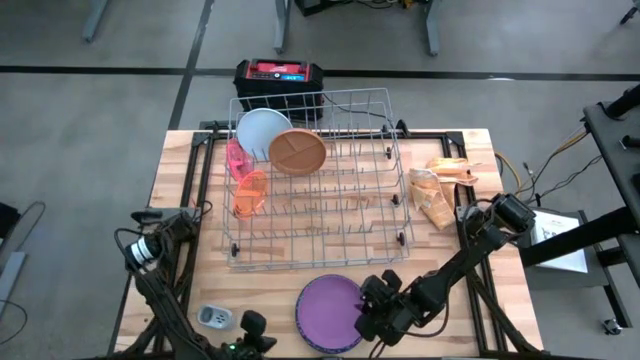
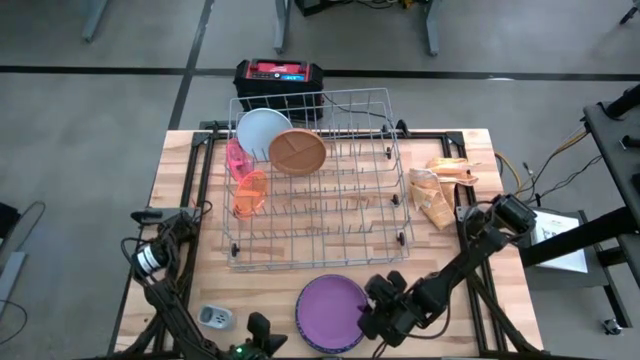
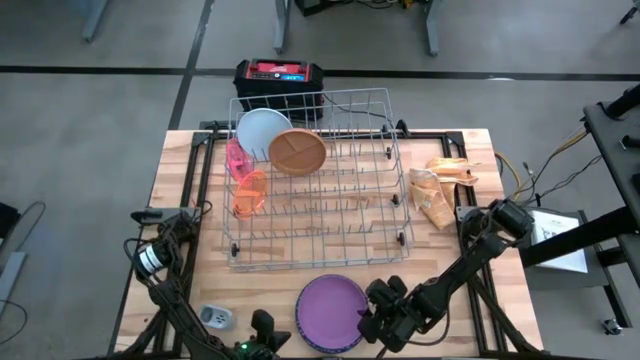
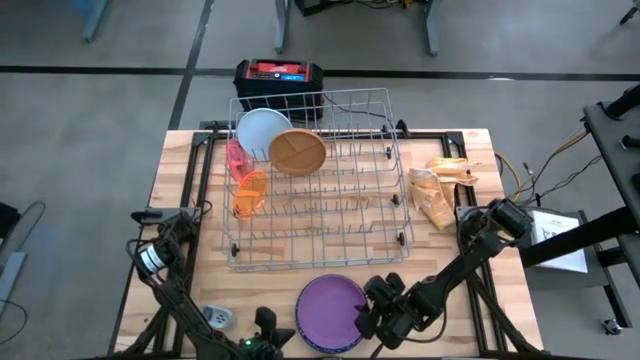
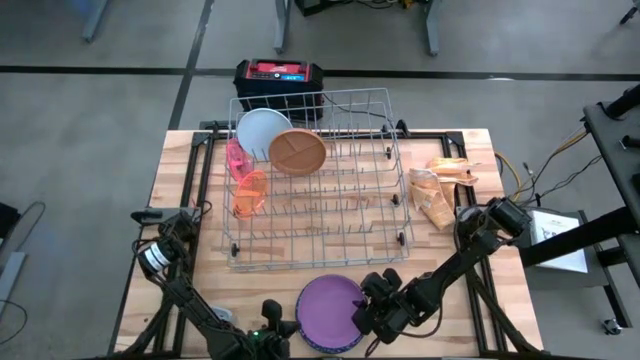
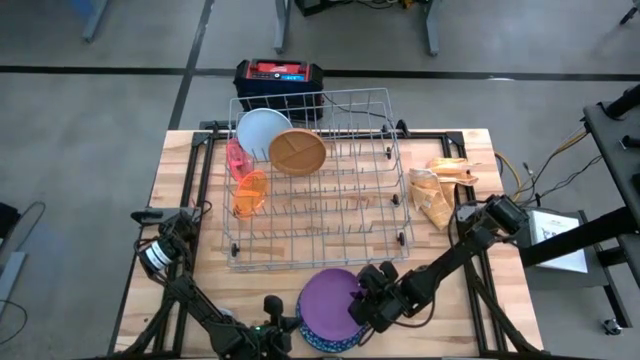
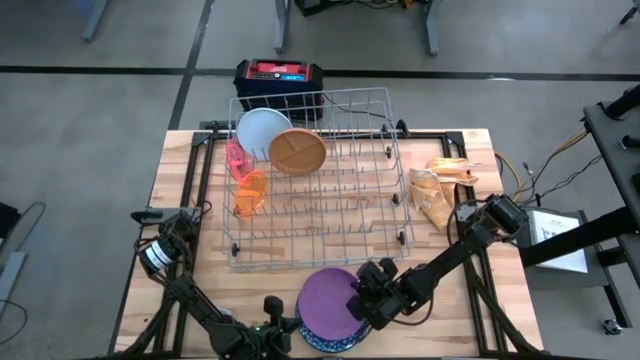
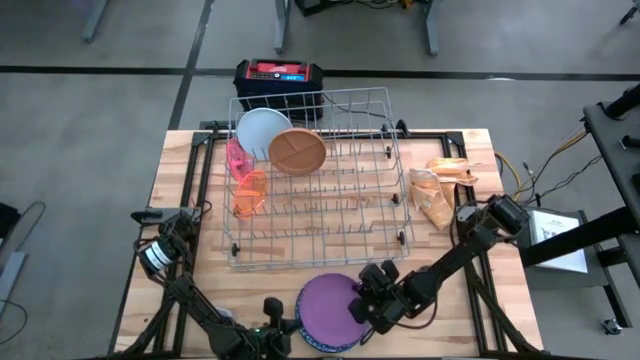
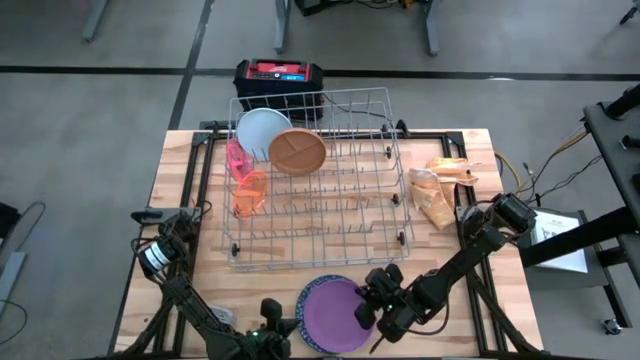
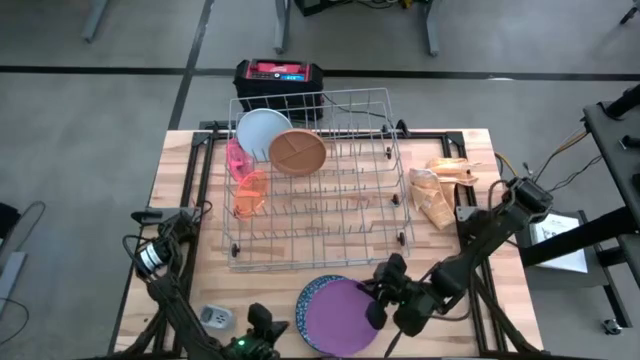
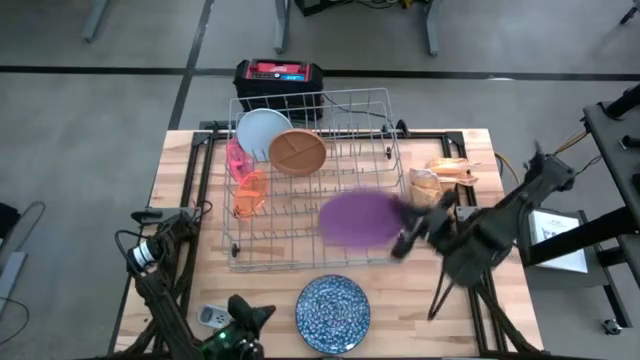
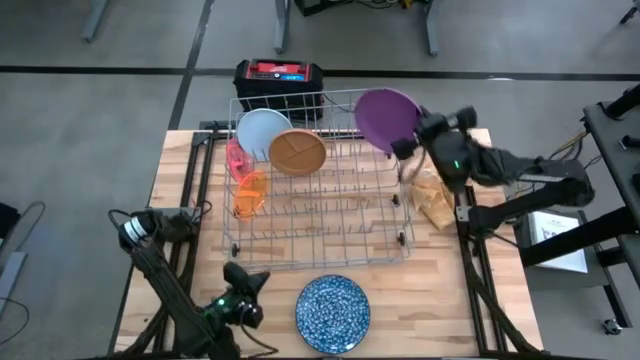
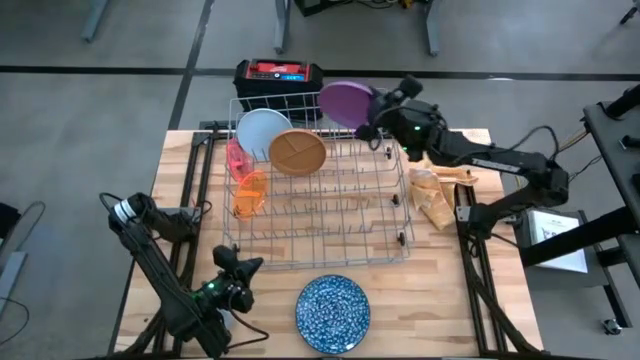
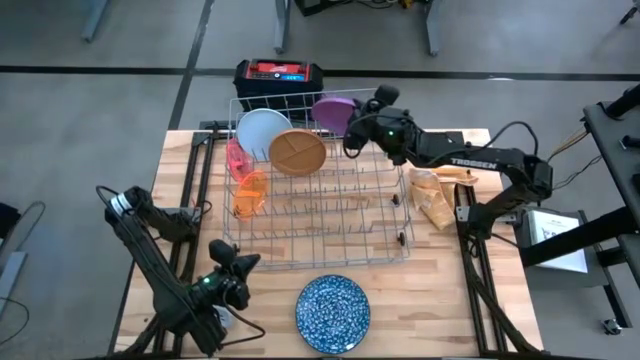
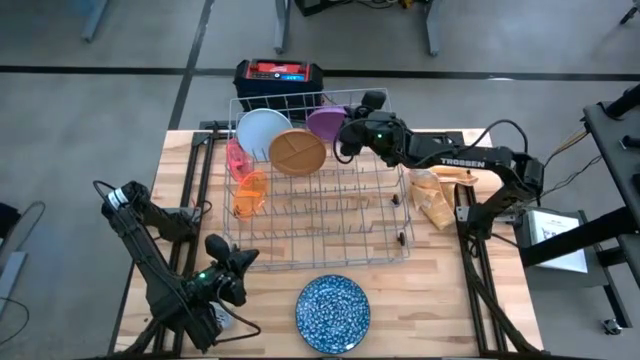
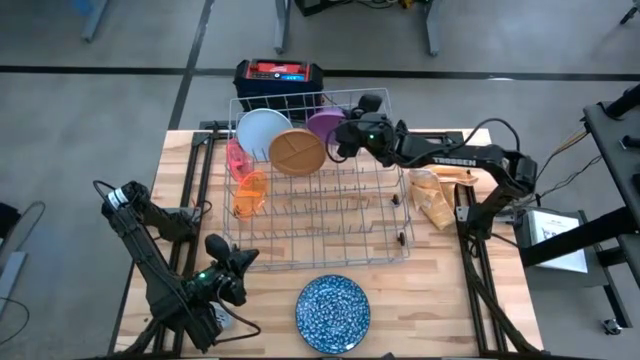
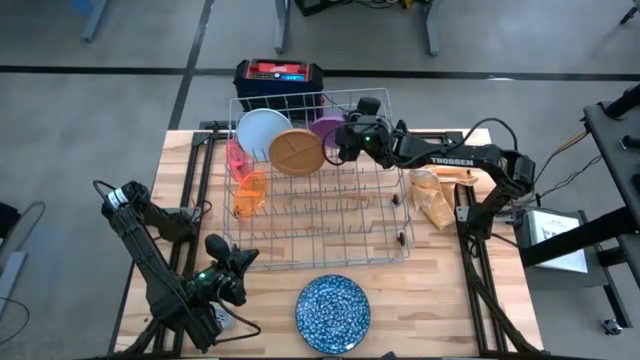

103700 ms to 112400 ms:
Task: Sort dishes
Put the violet plate into the dish rack

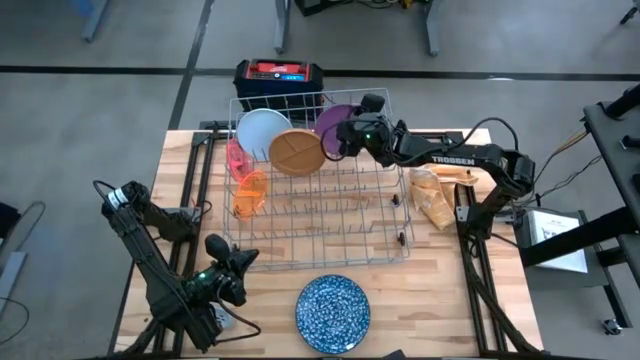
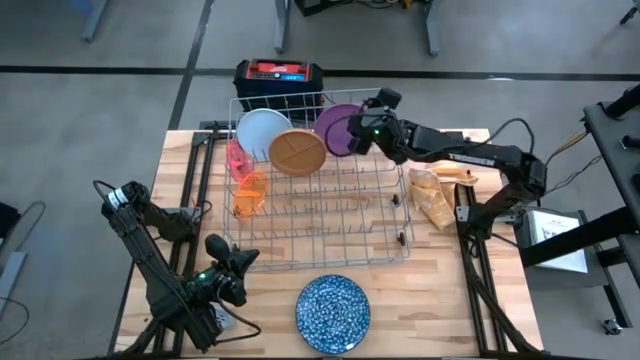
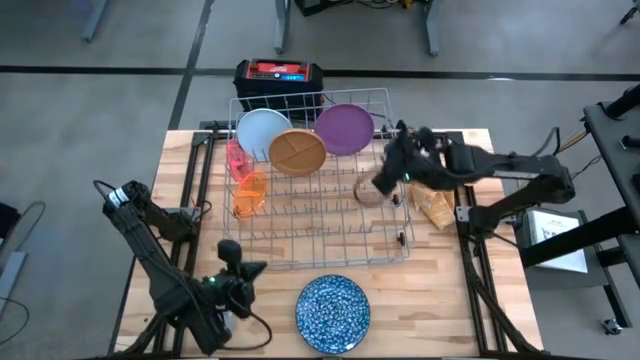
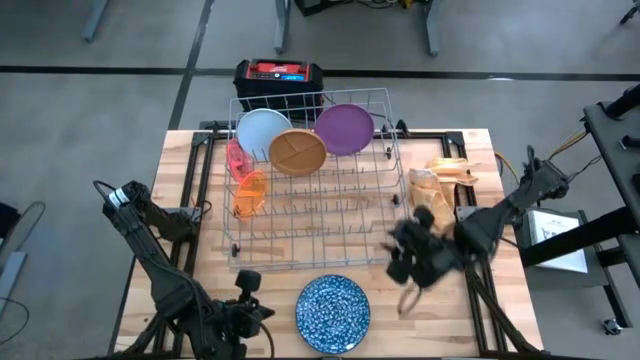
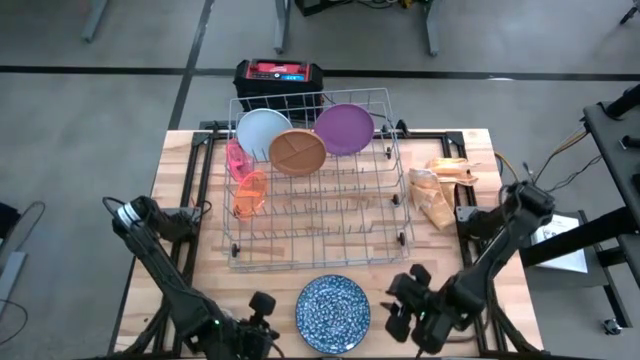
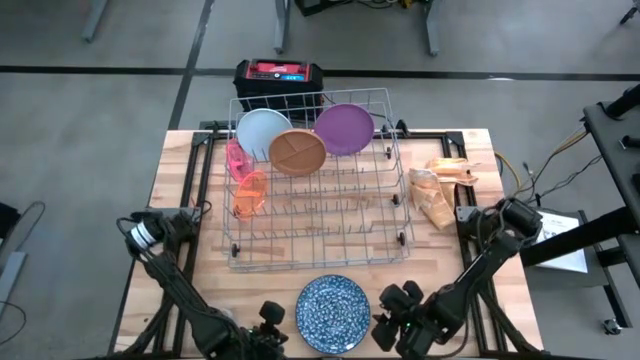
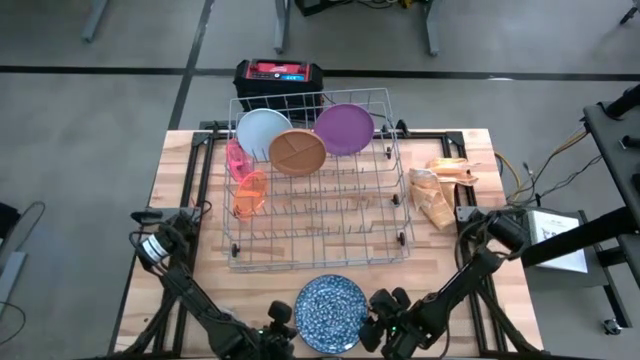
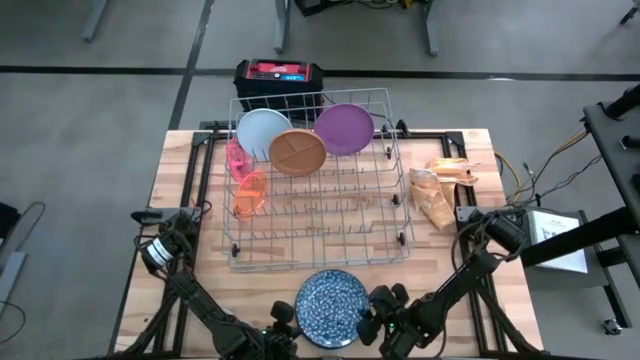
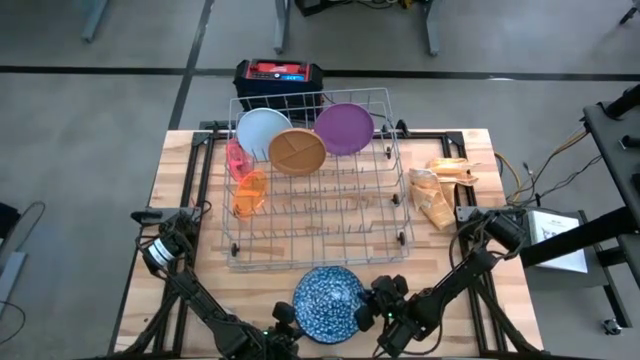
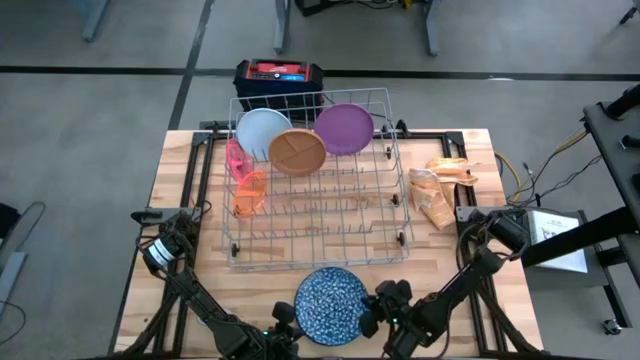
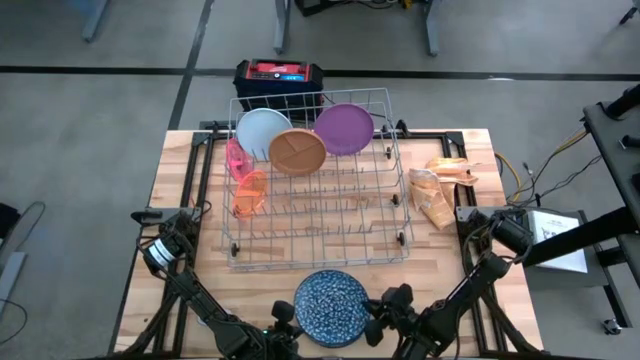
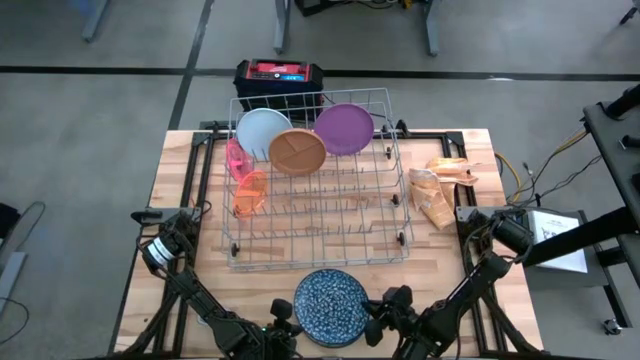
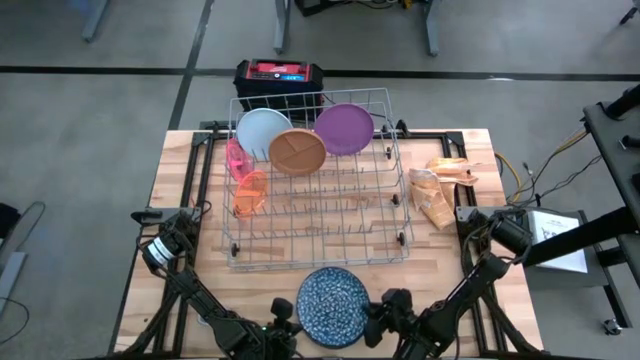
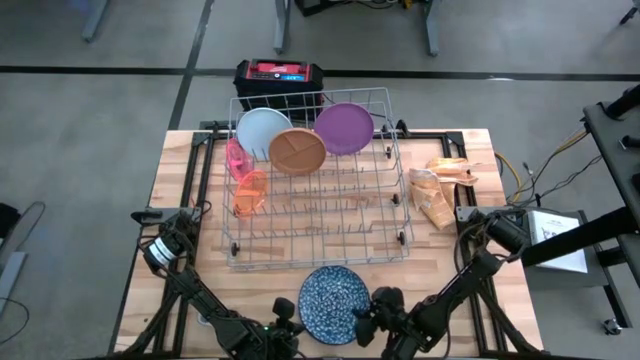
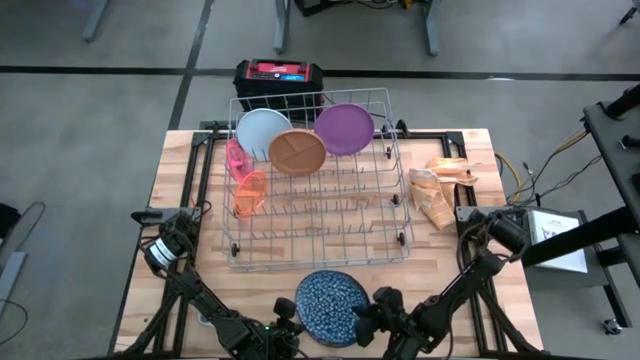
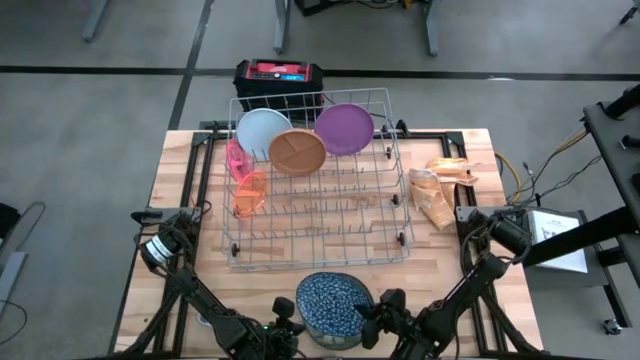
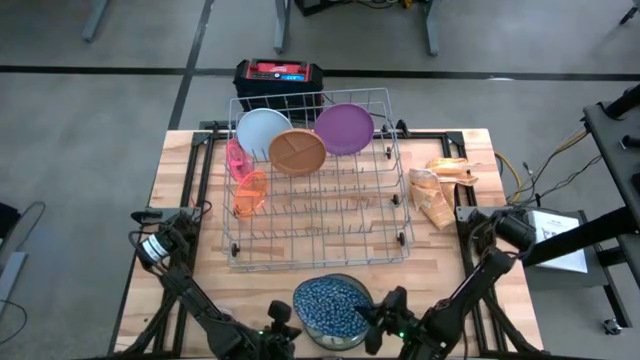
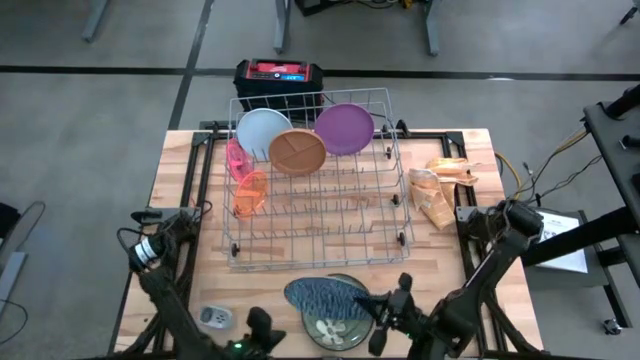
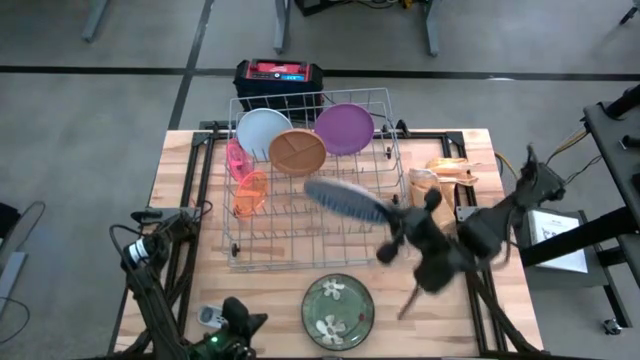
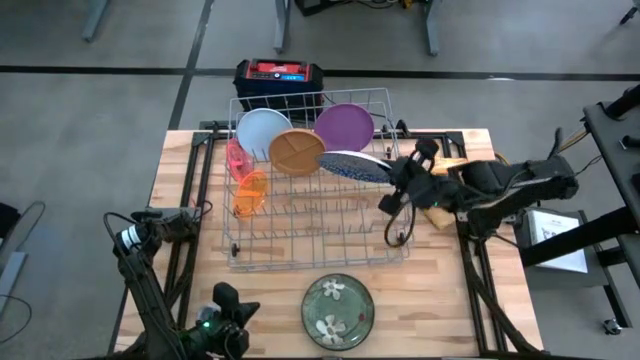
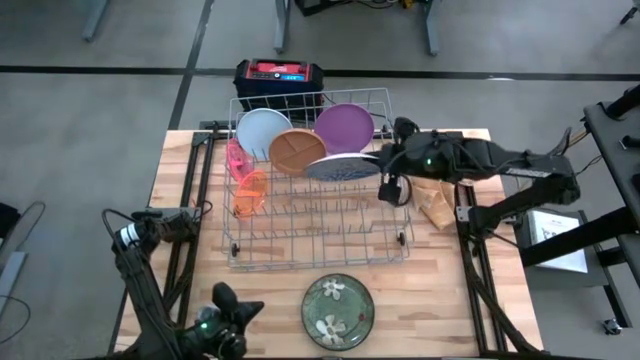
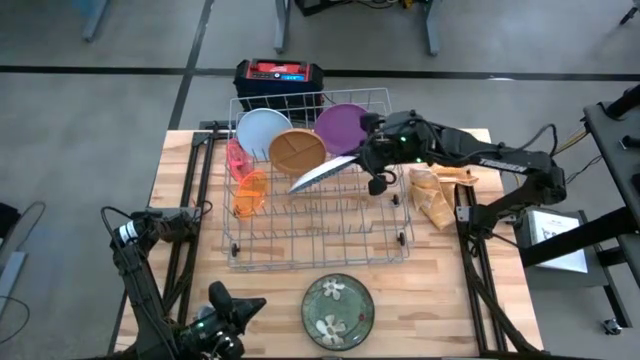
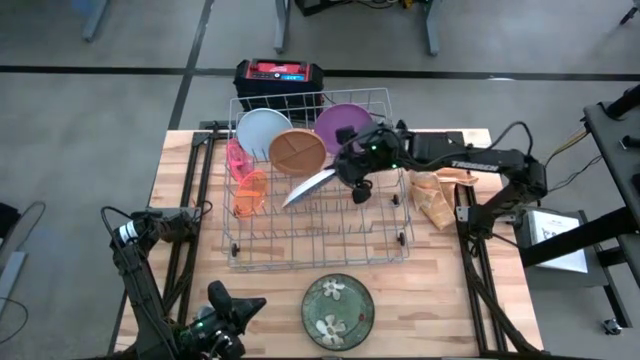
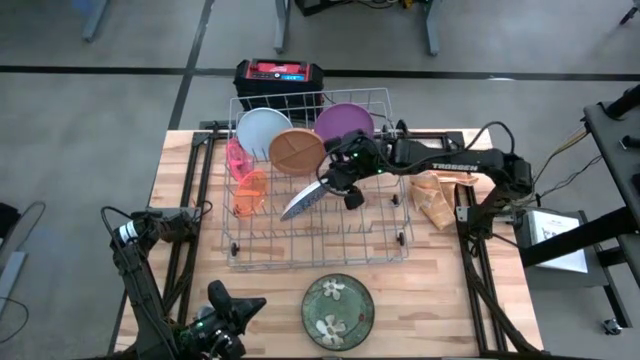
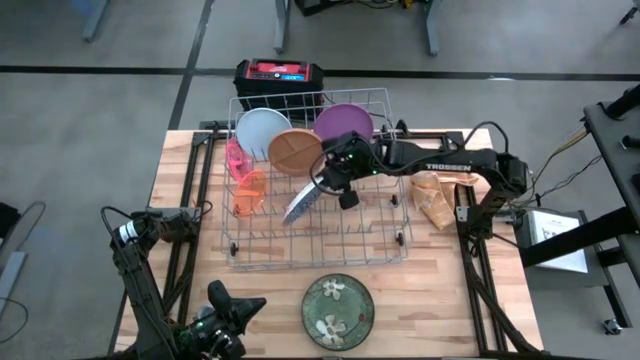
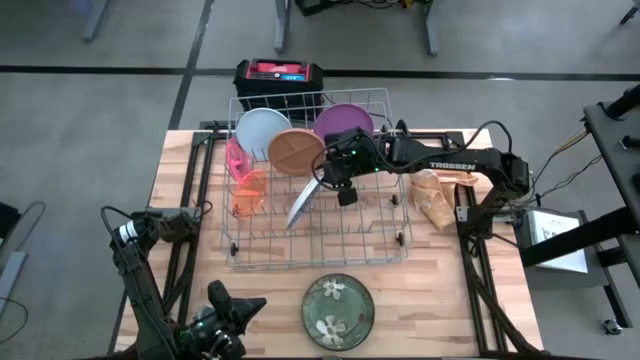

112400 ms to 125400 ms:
Put the blue plate into the dish rack

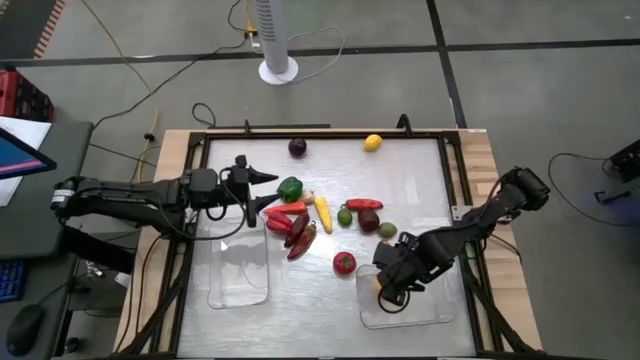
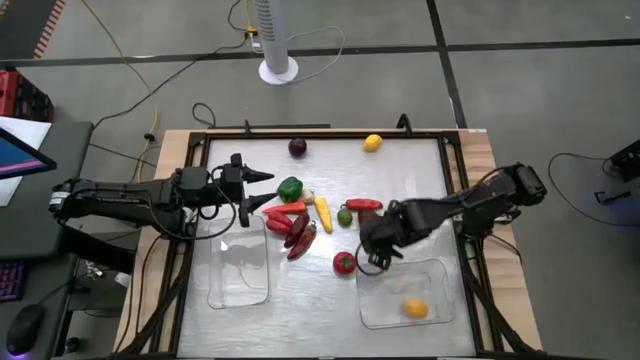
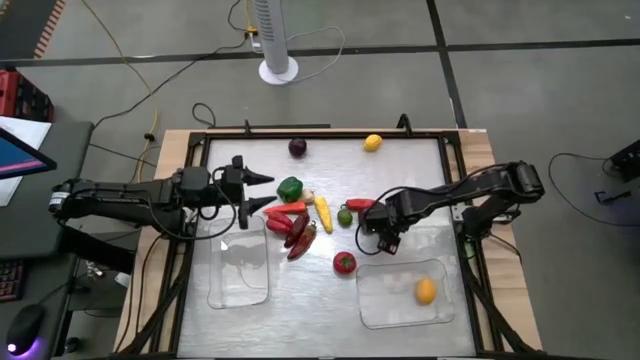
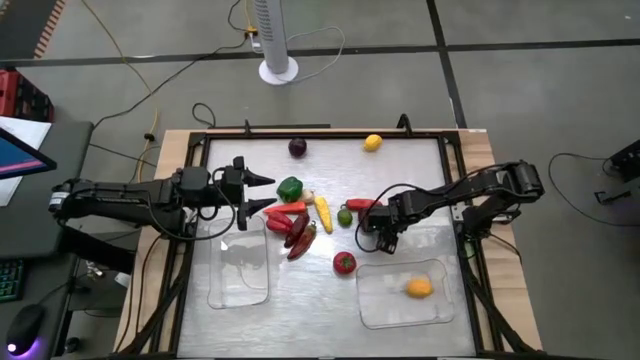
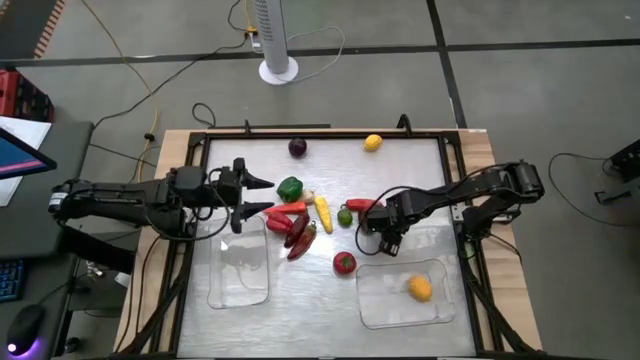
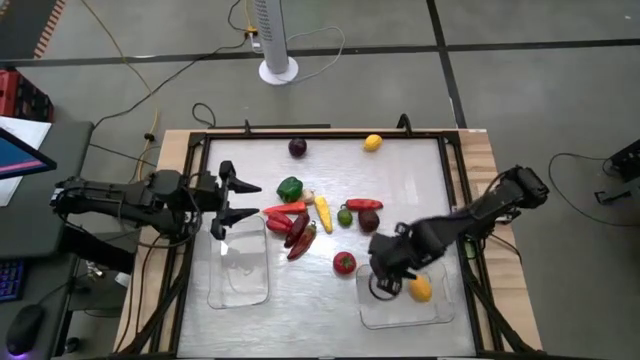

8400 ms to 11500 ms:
Task: Sort produce into baskets
Put the bottom lime into the right transparent bin
